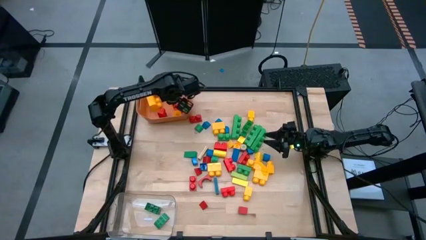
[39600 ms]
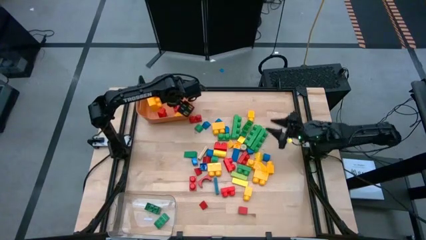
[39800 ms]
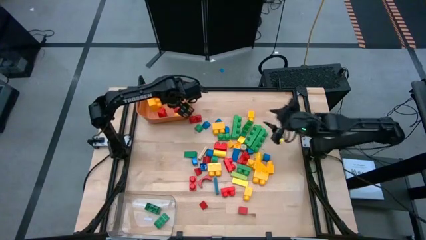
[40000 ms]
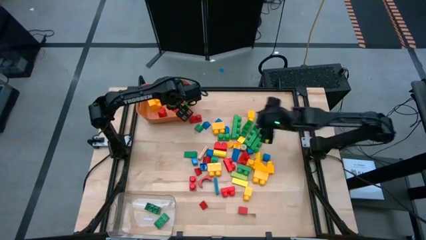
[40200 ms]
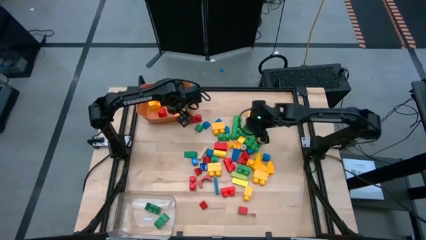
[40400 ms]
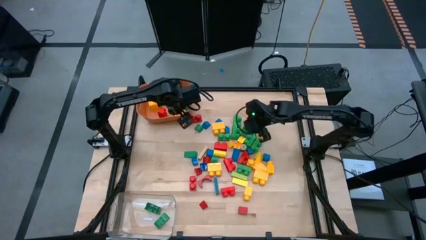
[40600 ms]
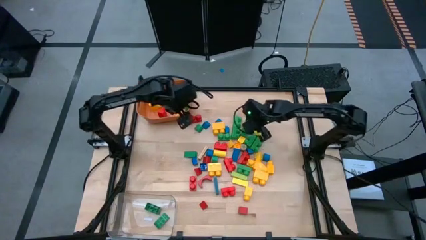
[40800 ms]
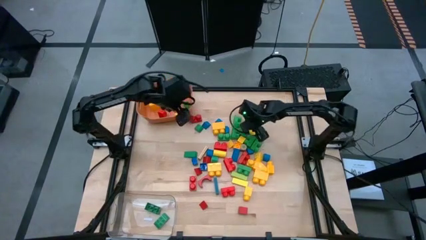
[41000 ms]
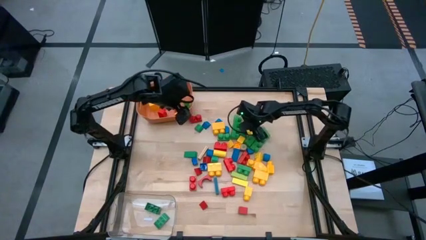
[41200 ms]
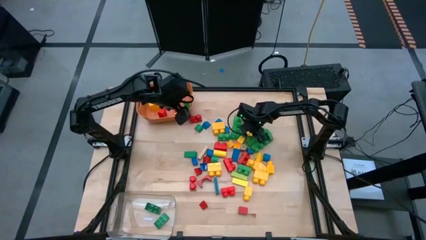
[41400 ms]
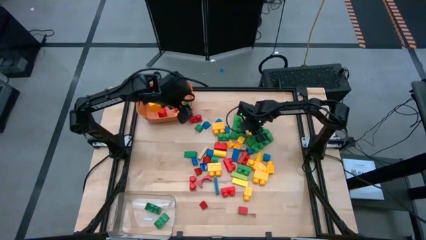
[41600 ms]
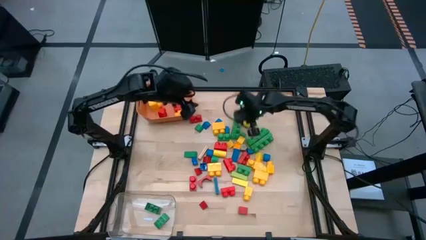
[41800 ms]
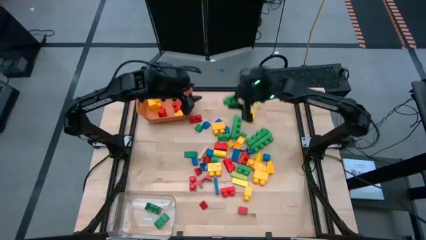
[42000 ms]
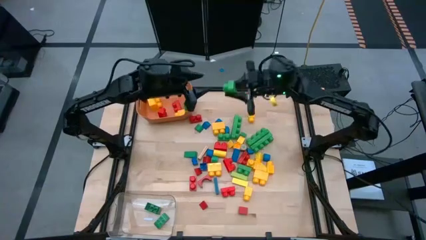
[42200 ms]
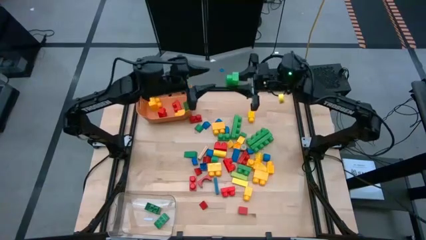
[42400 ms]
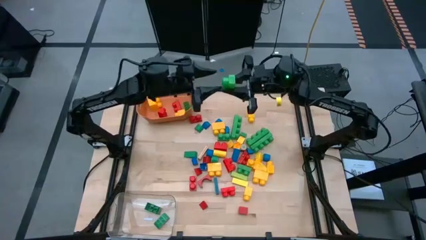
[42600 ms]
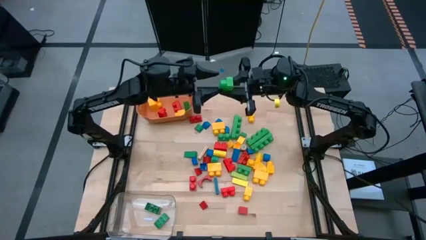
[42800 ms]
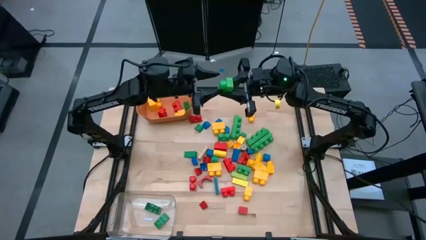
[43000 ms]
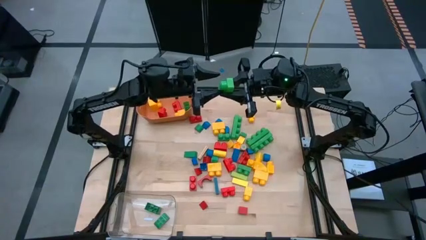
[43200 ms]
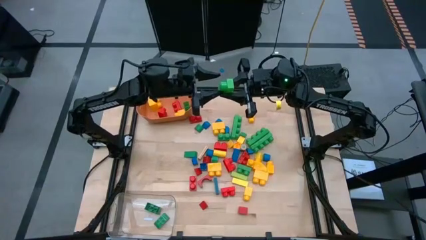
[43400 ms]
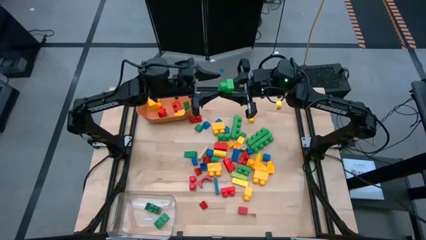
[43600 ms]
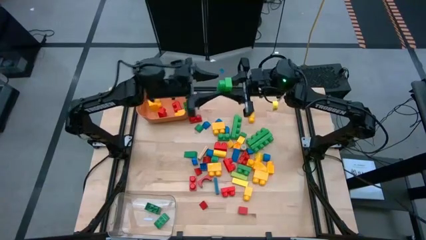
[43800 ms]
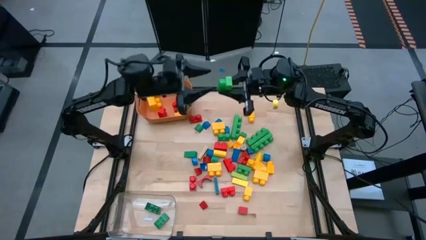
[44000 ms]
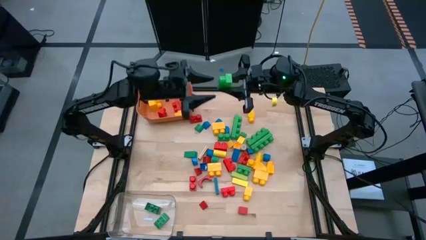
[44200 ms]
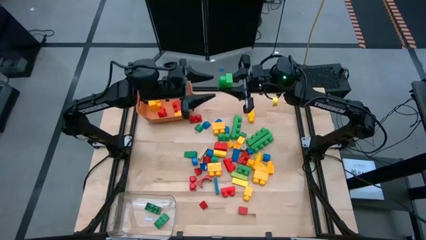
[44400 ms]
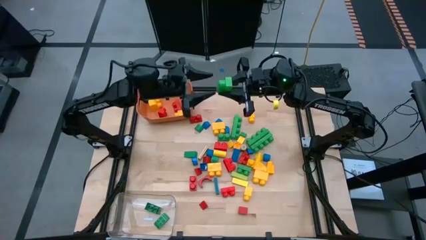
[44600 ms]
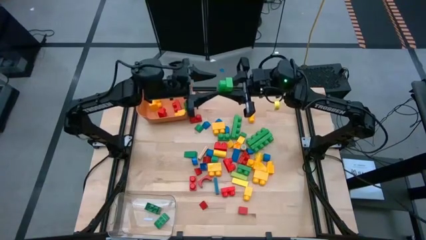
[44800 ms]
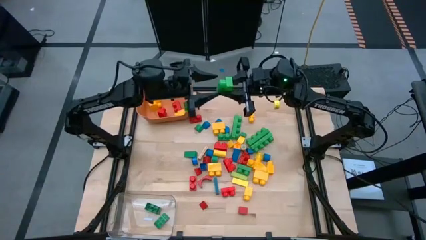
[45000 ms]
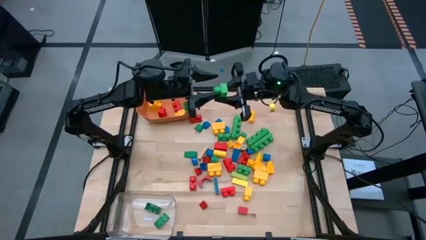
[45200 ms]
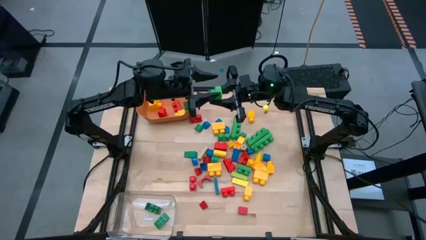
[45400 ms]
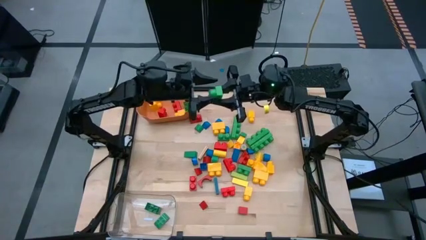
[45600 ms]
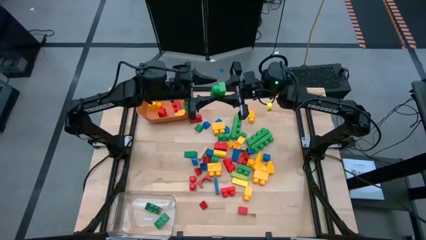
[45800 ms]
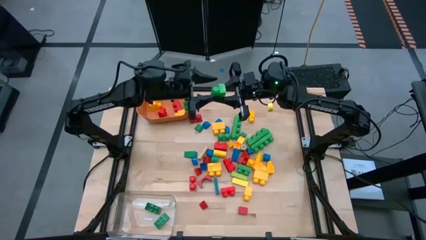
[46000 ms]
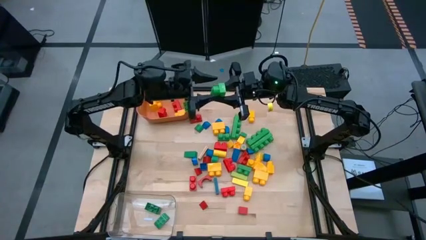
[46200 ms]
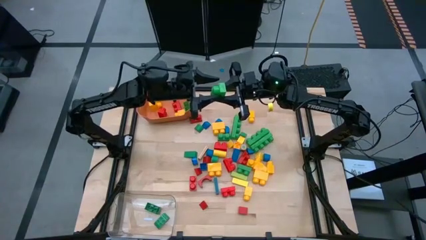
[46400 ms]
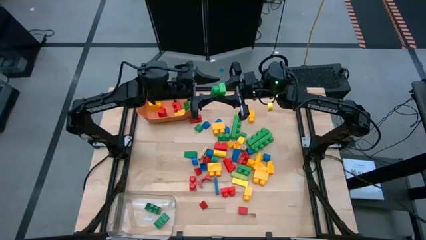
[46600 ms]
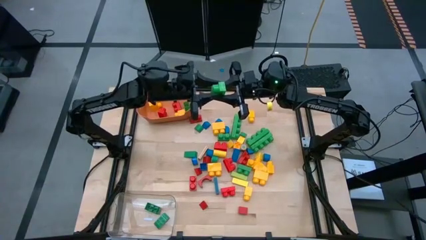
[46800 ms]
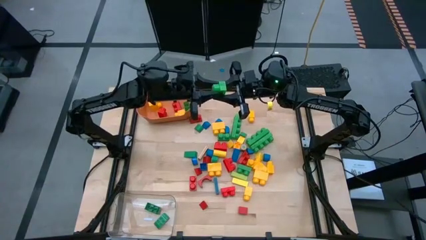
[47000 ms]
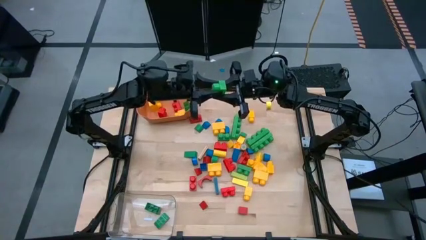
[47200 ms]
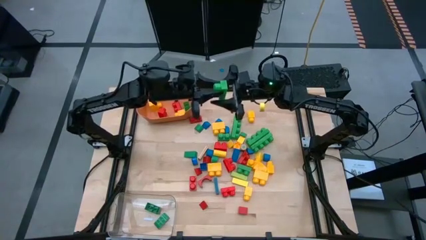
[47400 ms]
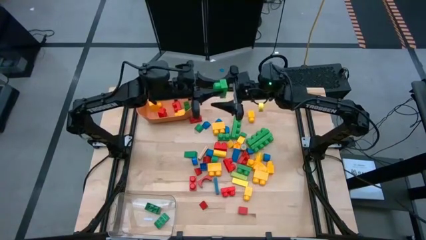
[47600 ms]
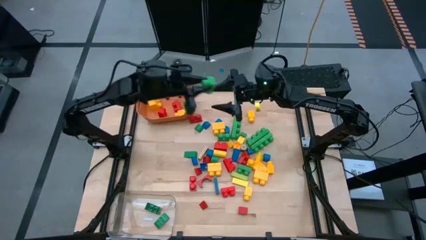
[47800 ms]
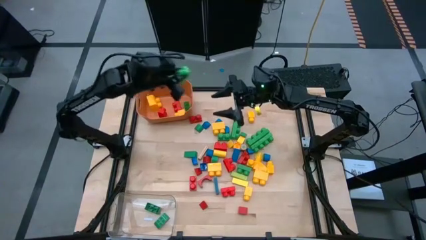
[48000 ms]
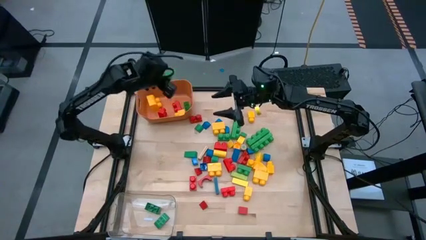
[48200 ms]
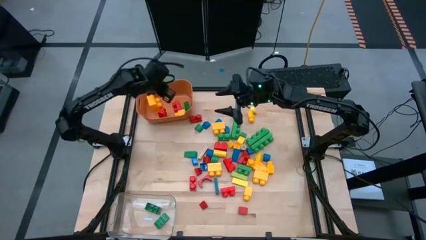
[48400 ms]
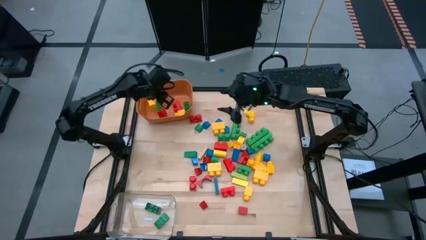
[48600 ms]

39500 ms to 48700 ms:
Task: Sort blocks by size
Put the big green game piece into the orange bin

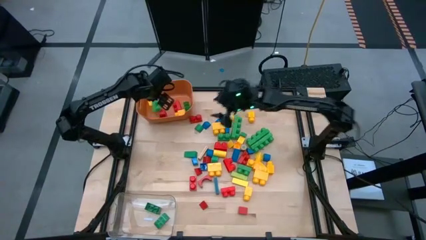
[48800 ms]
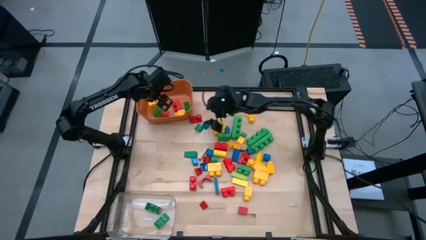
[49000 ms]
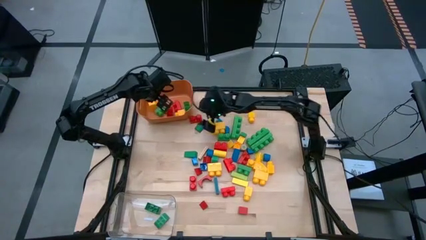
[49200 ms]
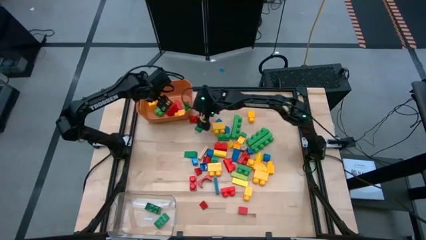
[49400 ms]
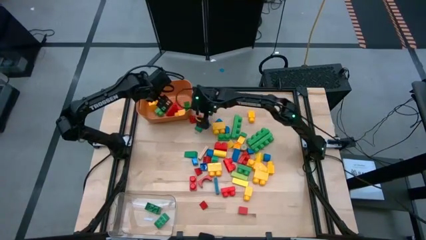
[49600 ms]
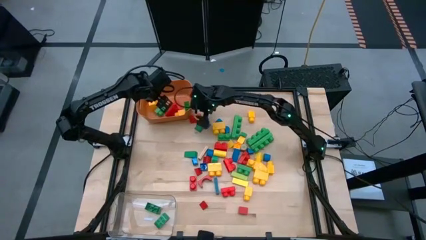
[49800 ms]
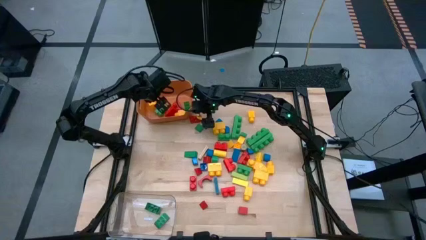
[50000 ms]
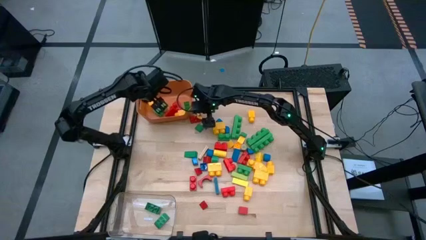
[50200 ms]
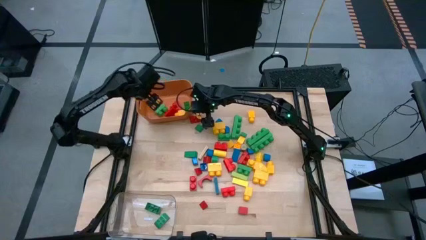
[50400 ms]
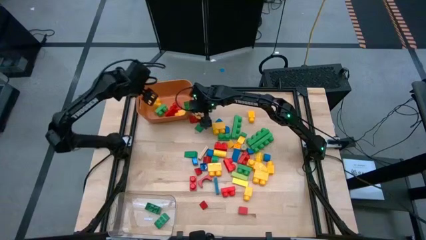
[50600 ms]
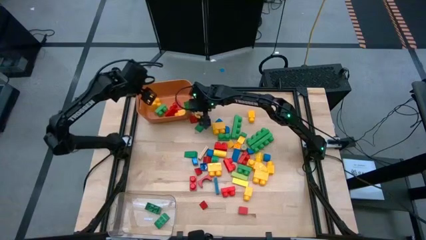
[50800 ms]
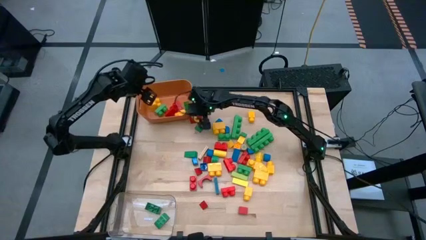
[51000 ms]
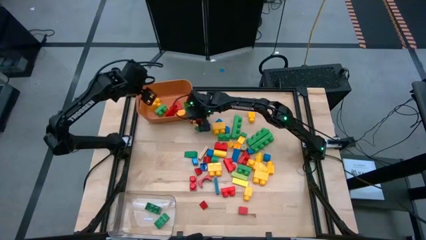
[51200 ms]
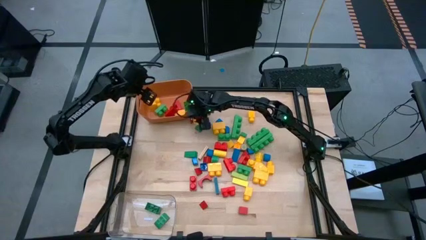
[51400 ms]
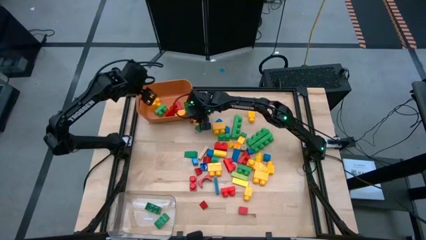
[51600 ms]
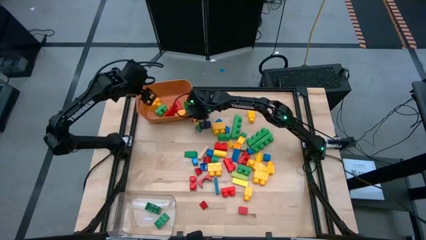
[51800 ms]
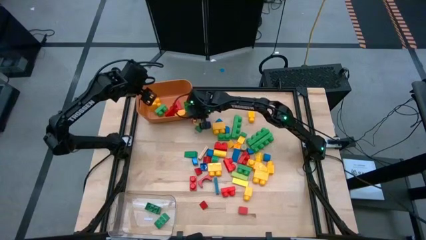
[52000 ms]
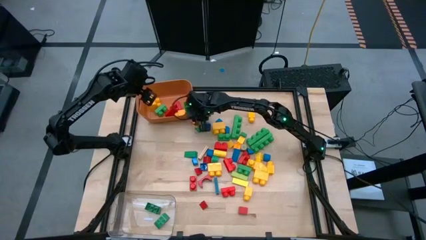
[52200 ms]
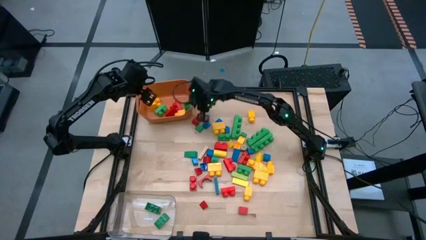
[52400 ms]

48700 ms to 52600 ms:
Put the big red game piece into the orange bin

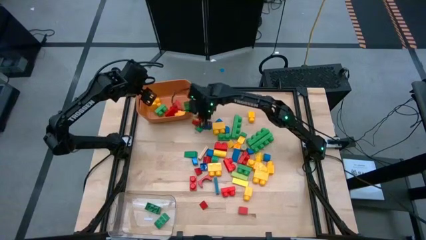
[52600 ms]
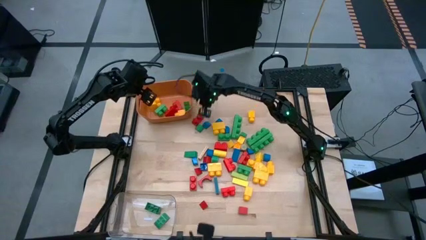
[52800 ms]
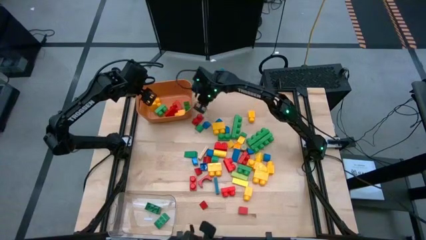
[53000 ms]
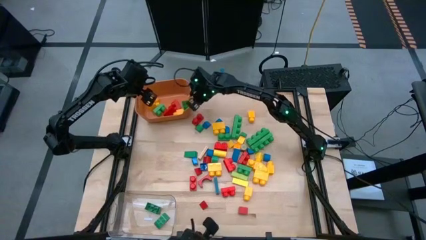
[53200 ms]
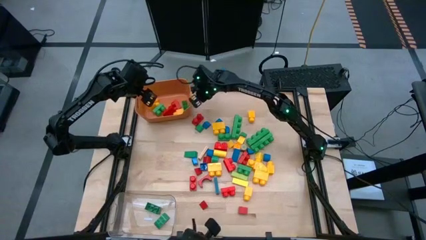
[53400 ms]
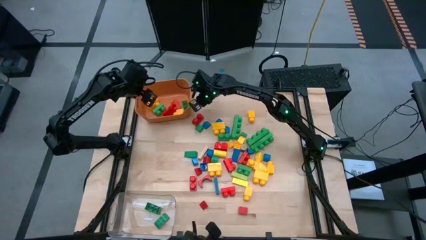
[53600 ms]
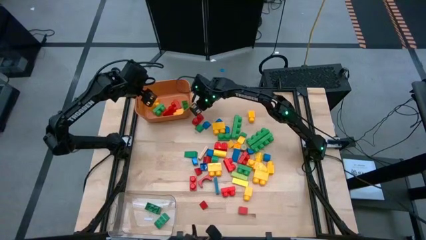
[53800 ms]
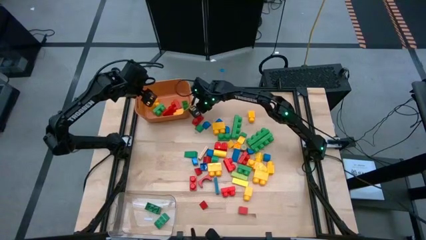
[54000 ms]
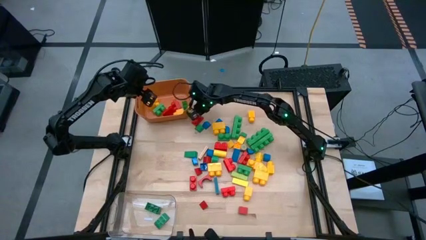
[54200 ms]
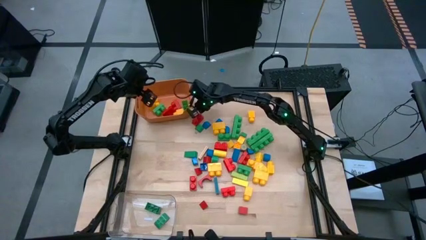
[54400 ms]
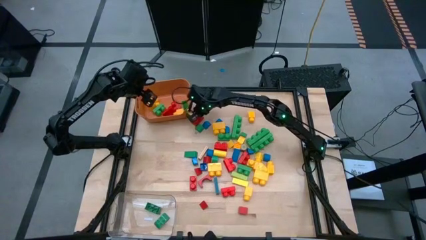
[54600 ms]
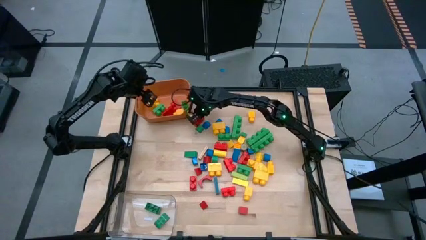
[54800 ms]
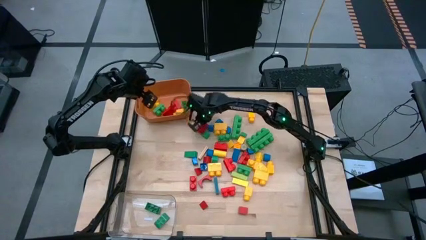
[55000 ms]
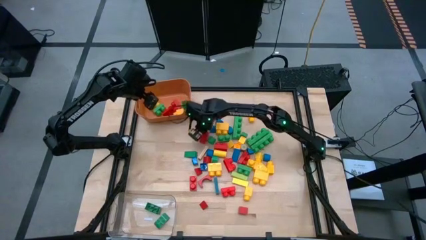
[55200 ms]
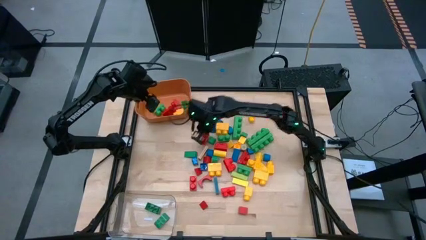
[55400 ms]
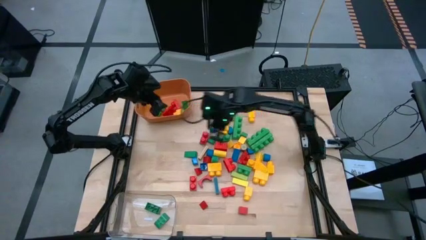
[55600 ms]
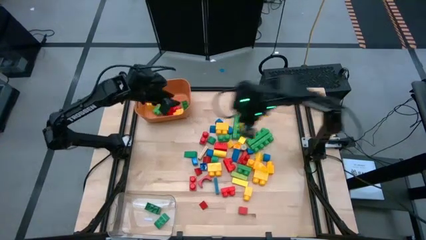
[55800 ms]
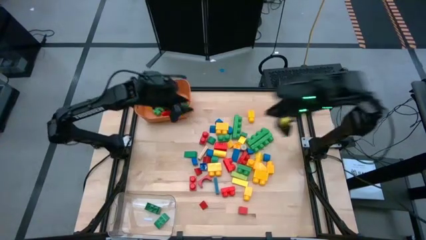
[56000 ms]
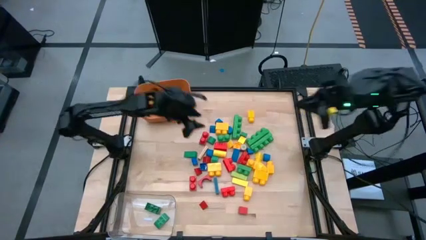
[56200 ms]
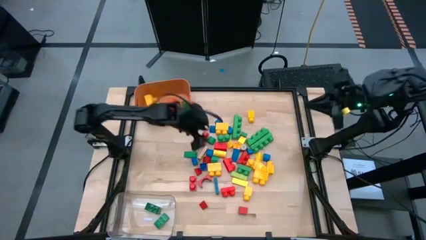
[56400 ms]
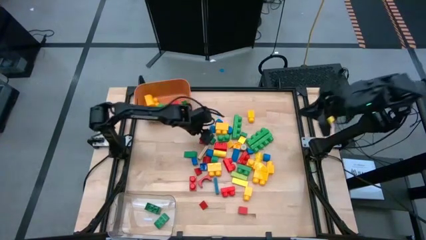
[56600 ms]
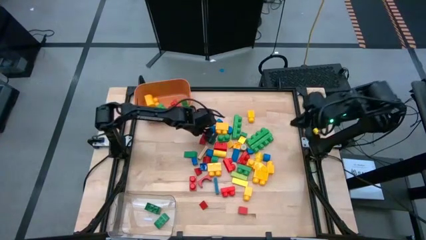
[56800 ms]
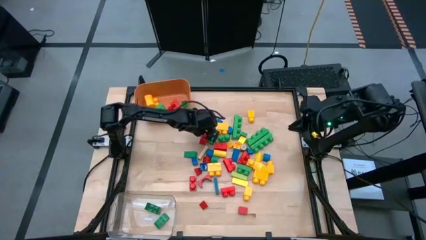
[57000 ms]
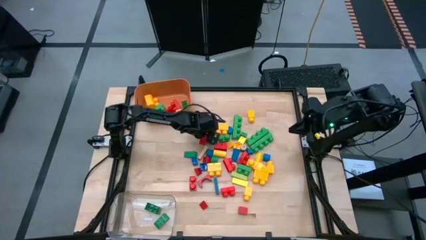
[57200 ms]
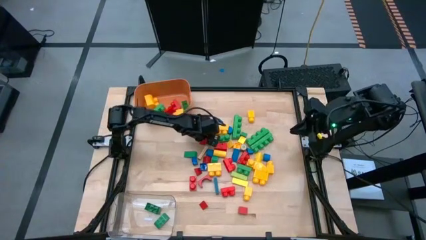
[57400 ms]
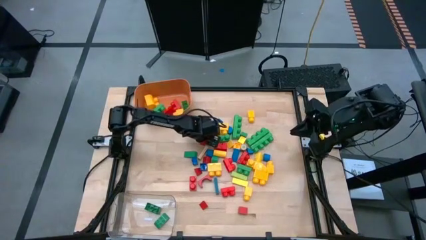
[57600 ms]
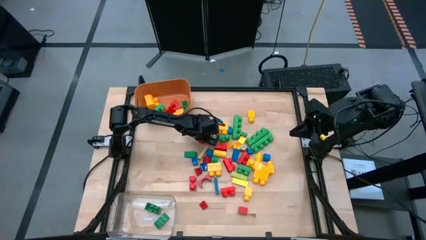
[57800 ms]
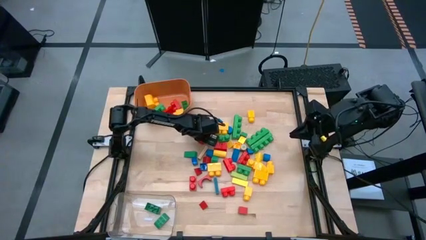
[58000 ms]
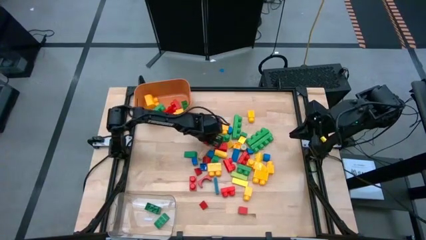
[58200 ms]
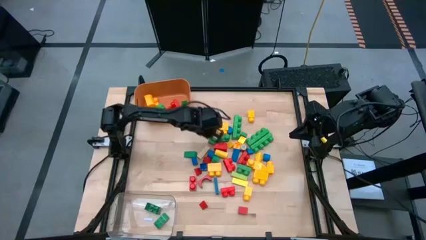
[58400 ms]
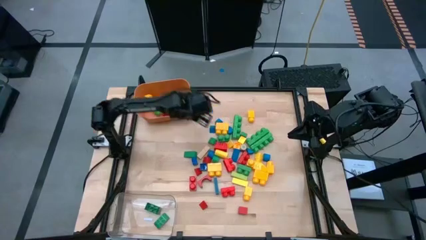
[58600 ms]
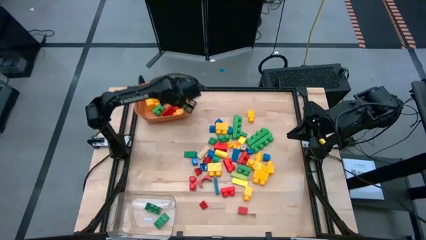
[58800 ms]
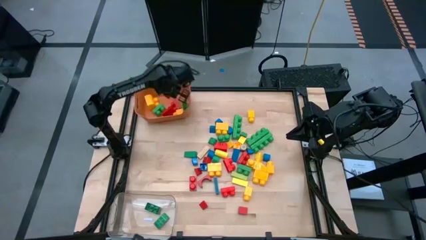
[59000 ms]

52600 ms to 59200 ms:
Put the big red game piece into the orange bin
